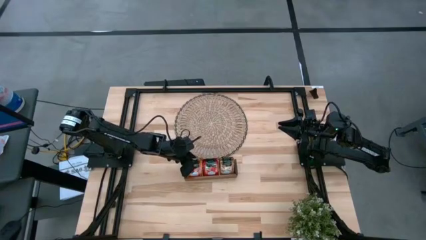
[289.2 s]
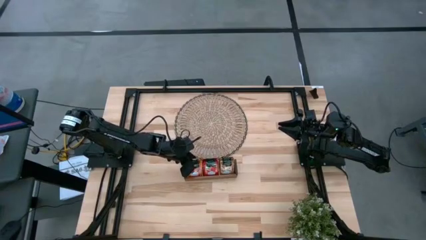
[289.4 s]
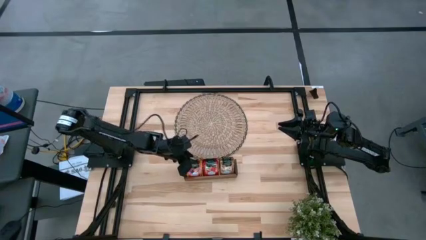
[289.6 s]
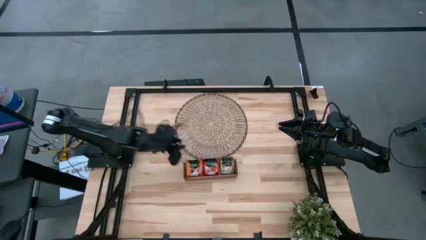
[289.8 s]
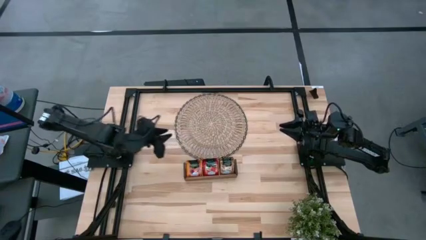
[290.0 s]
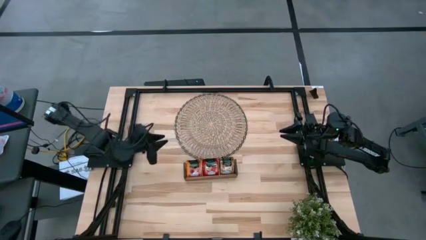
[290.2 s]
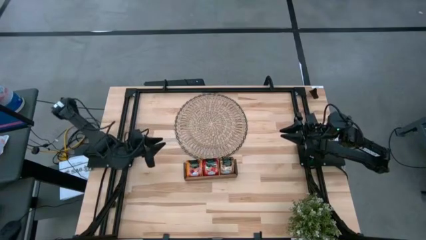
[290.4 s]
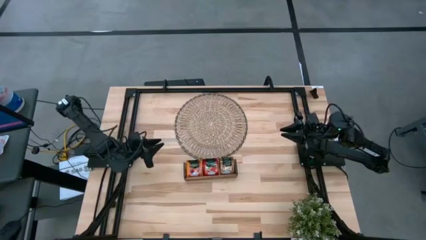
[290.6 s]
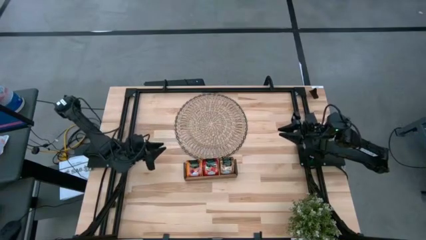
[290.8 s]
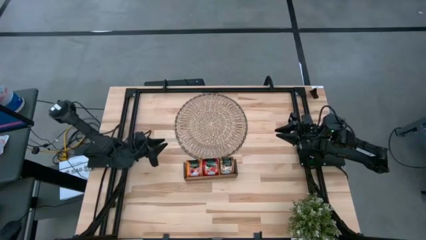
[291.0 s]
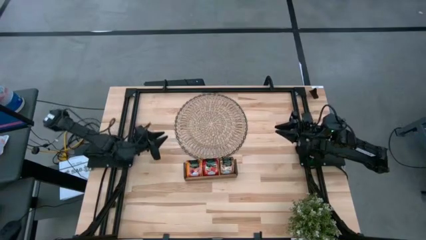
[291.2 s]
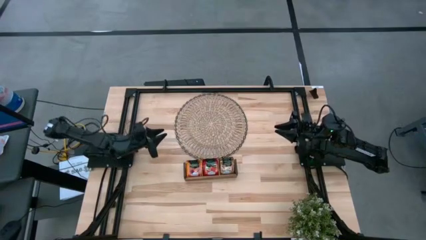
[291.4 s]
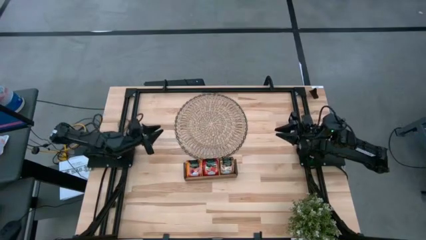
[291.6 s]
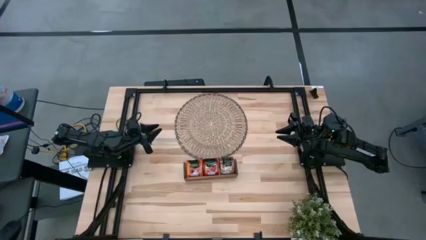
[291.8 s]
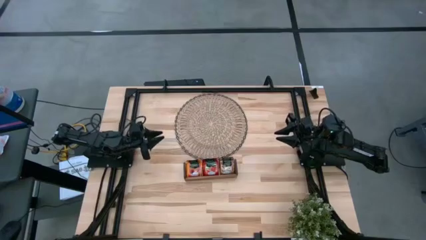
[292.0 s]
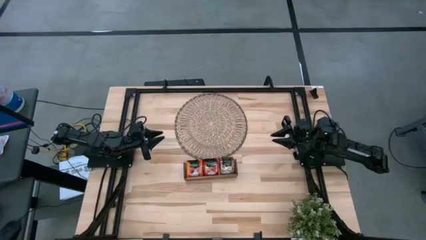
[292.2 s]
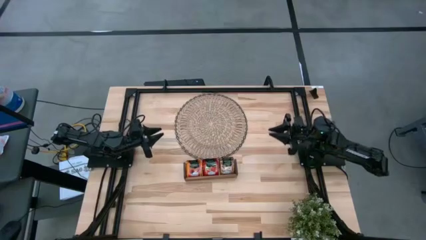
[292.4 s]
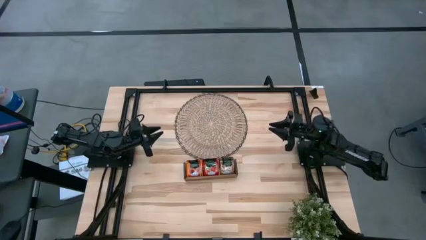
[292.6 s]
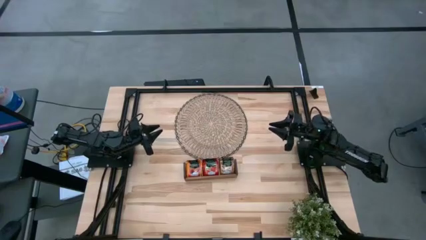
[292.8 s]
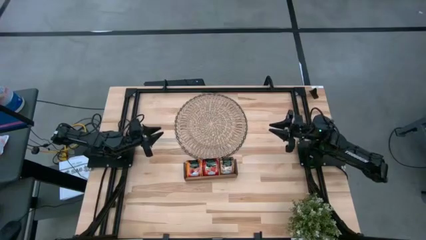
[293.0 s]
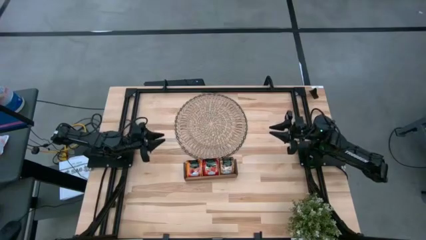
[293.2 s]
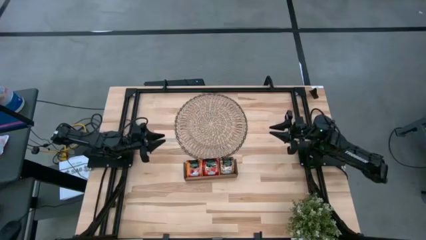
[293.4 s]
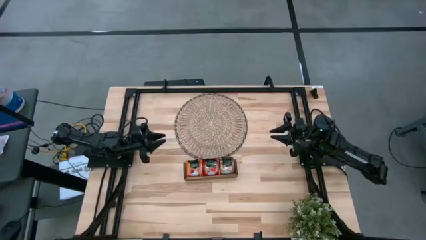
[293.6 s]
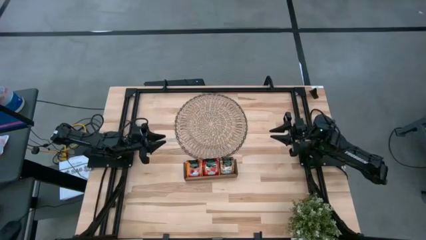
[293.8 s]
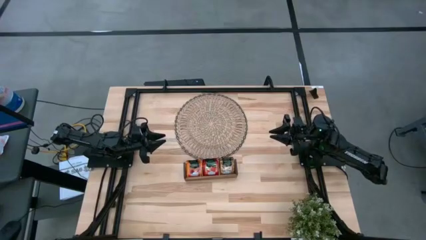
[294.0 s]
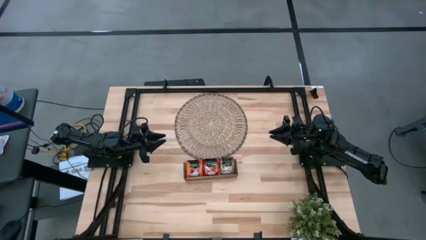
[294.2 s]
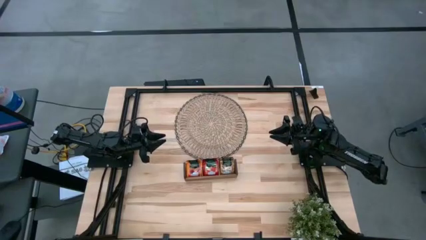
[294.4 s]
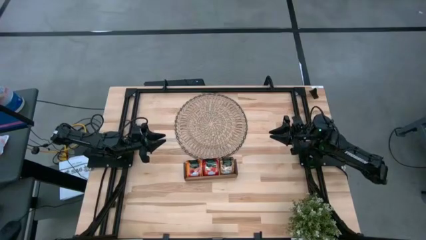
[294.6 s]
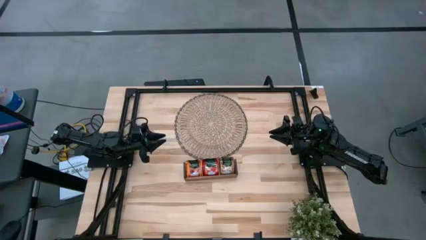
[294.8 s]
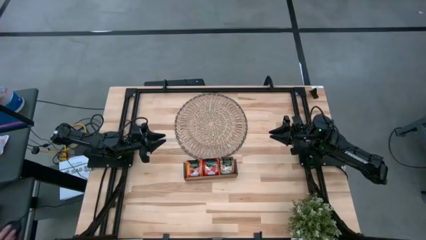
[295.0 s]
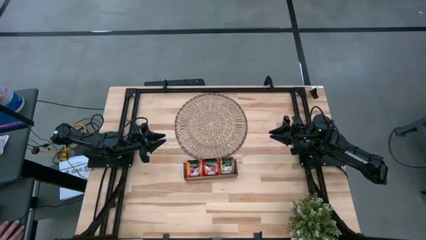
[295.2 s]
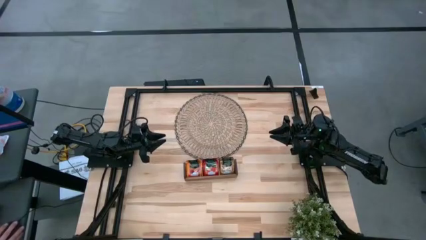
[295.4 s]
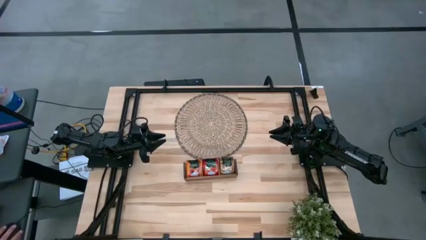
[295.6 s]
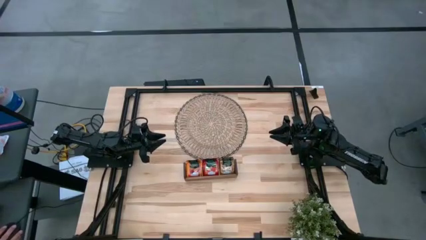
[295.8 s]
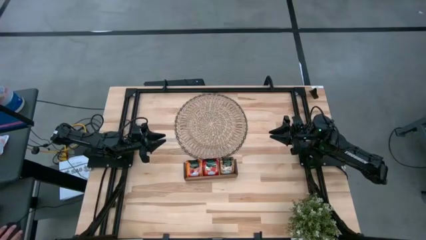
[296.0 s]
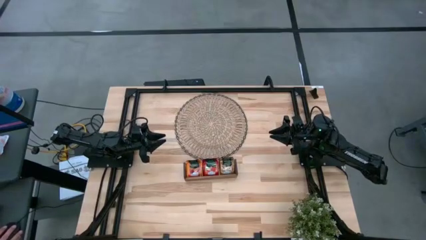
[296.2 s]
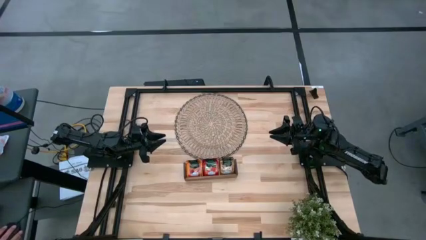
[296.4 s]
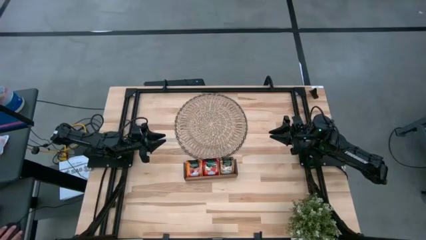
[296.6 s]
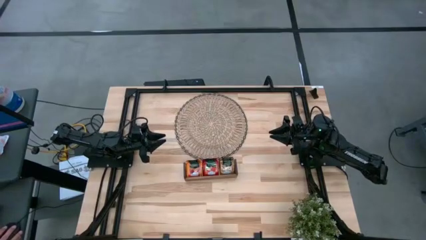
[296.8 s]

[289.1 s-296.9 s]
Task: Pick & Place Tea
Return to Home Position
